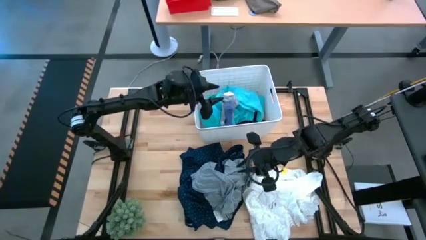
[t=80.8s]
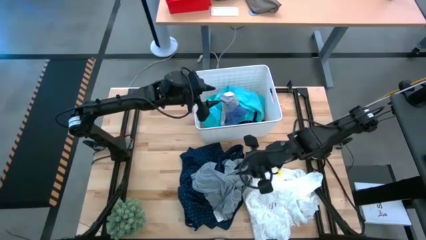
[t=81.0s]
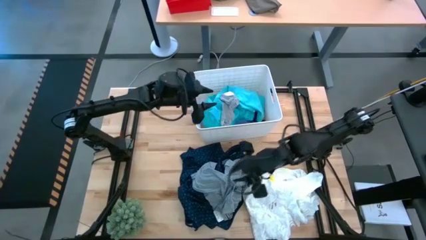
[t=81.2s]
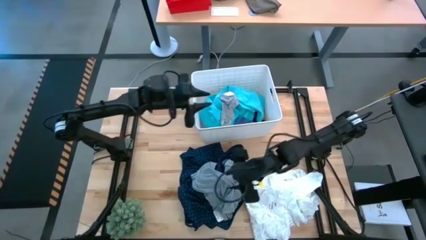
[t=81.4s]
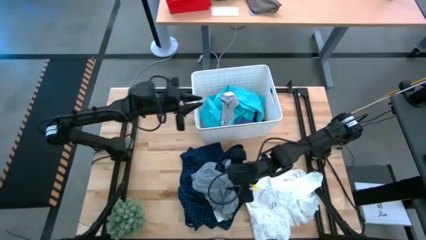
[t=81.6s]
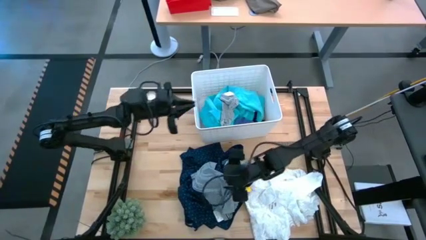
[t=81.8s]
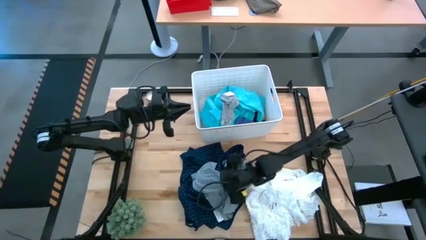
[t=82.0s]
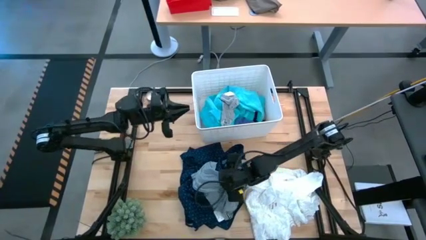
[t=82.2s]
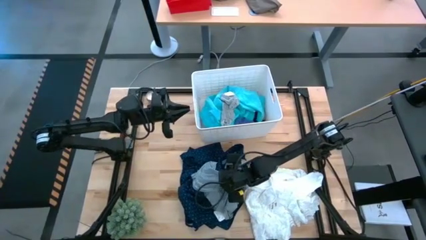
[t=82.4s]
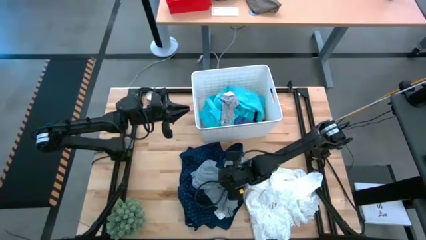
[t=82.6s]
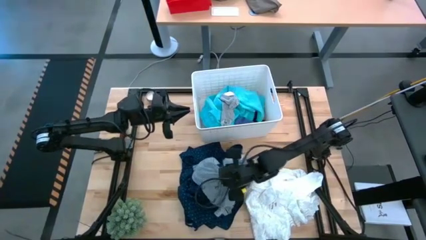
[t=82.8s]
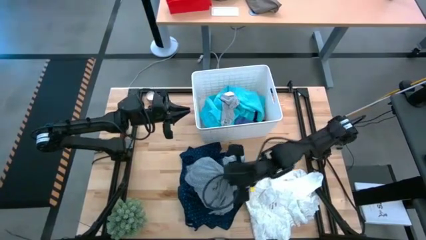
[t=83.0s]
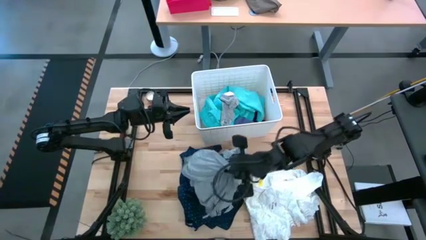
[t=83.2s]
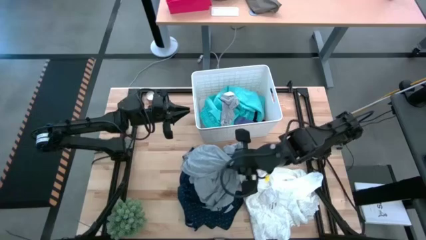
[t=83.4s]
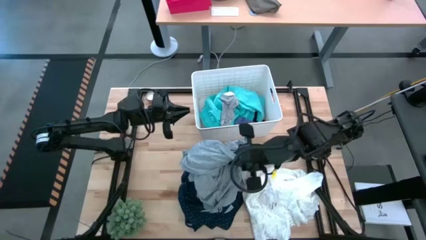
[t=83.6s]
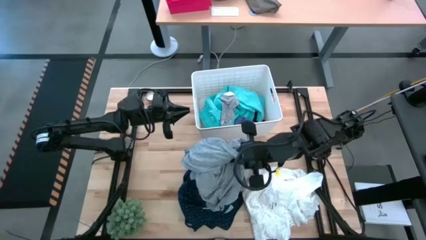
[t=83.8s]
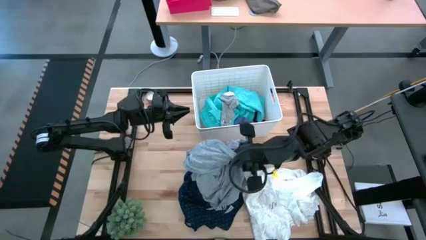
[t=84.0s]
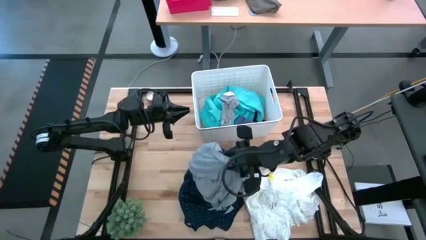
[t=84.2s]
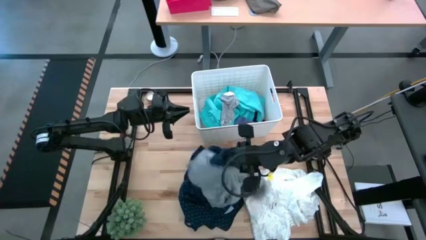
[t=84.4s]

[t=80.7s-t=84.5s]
Task: Sort clothes
Put the gray shirt in the bin

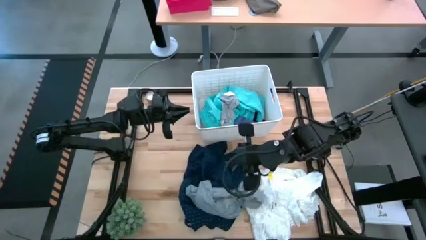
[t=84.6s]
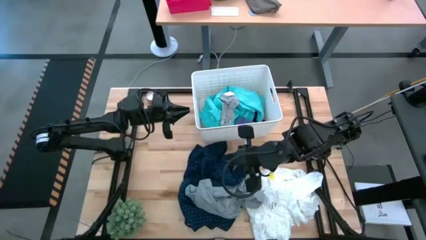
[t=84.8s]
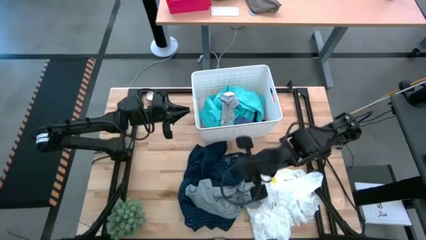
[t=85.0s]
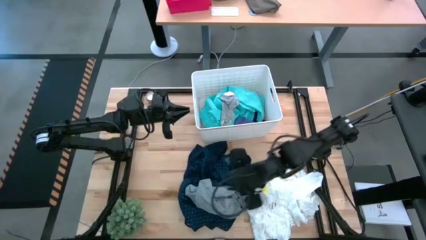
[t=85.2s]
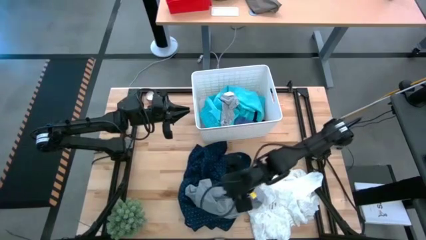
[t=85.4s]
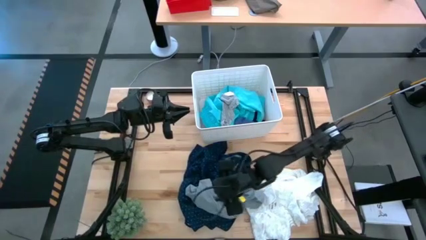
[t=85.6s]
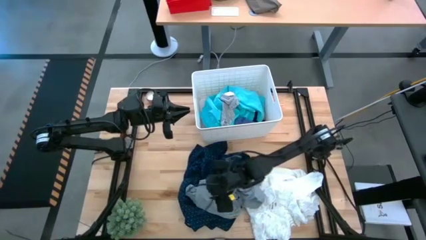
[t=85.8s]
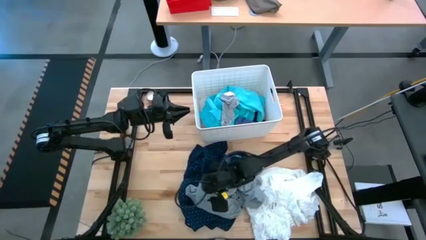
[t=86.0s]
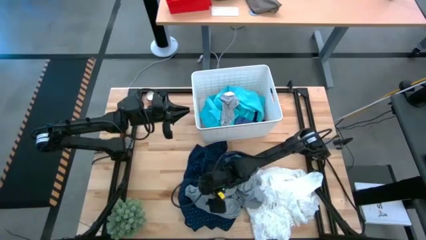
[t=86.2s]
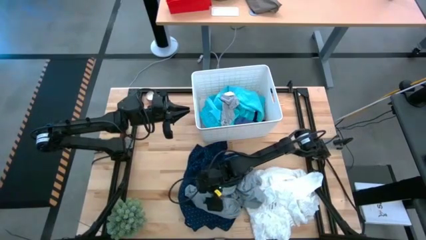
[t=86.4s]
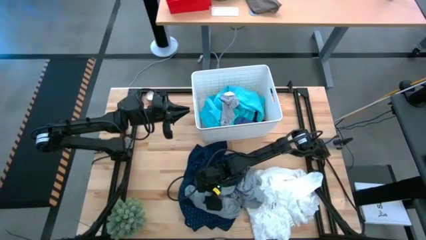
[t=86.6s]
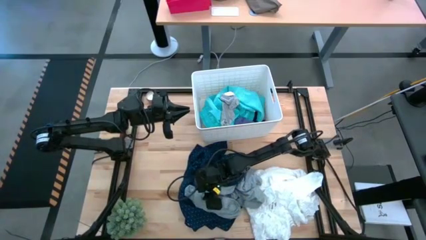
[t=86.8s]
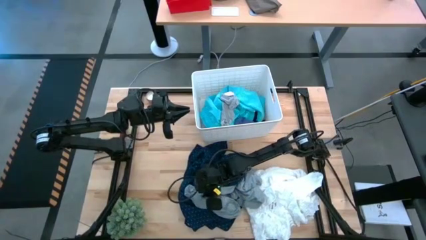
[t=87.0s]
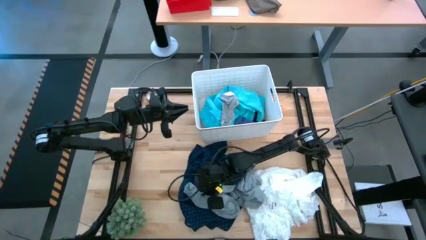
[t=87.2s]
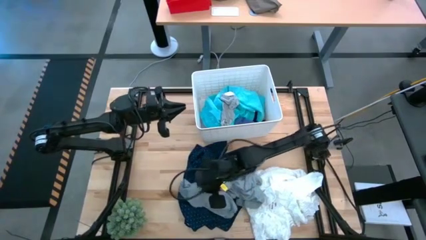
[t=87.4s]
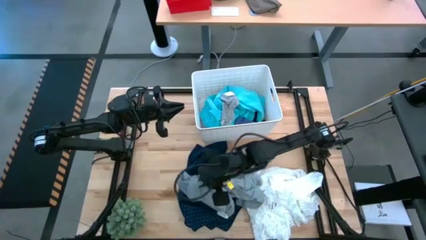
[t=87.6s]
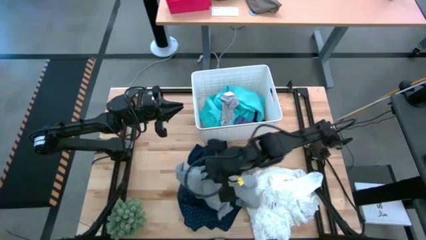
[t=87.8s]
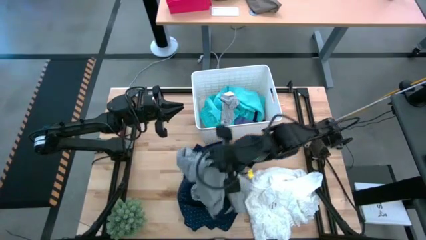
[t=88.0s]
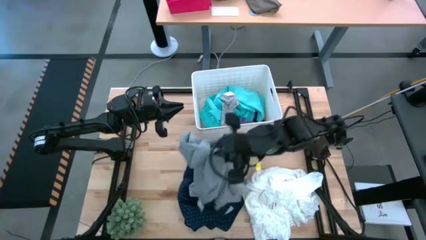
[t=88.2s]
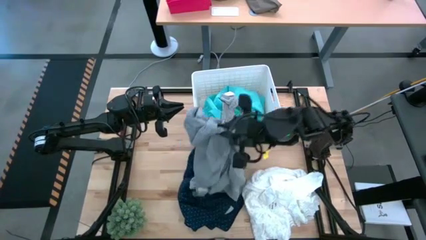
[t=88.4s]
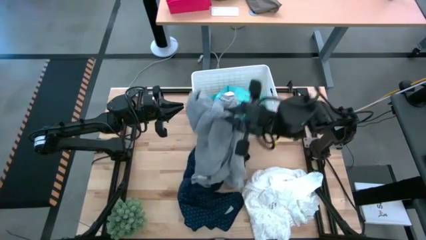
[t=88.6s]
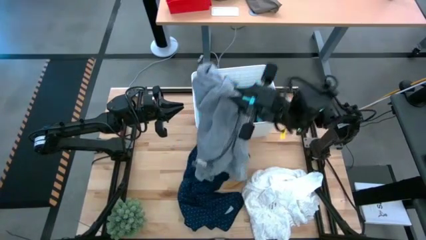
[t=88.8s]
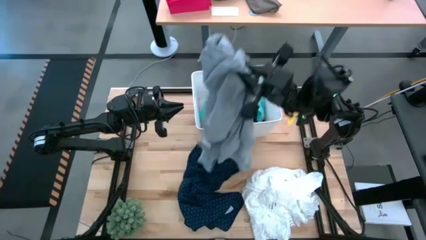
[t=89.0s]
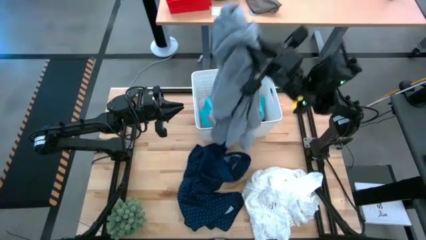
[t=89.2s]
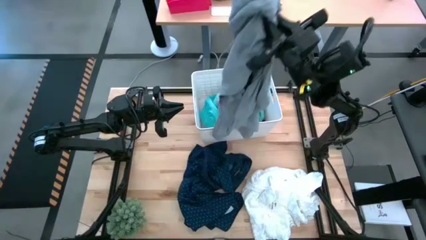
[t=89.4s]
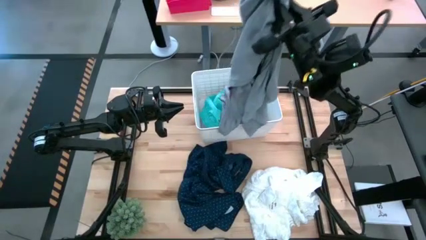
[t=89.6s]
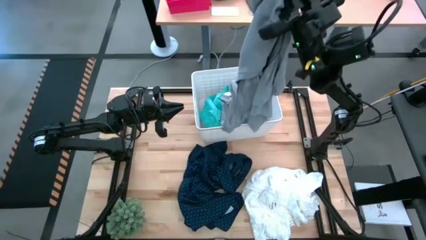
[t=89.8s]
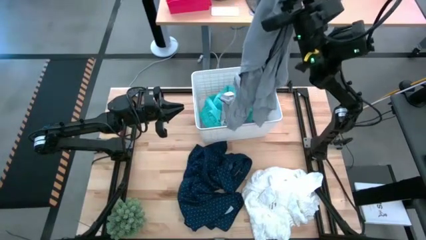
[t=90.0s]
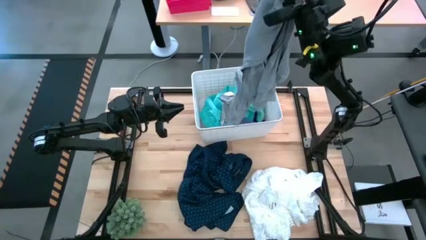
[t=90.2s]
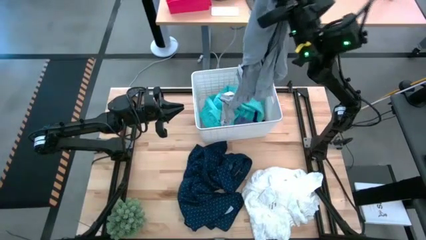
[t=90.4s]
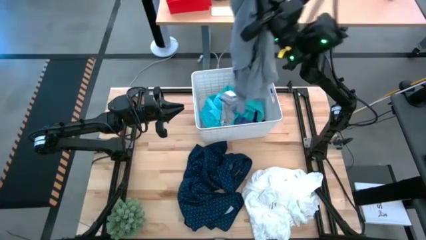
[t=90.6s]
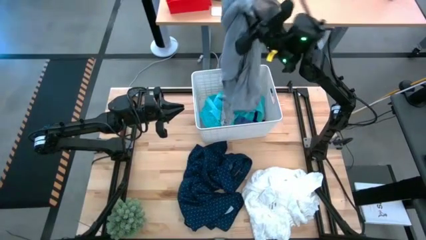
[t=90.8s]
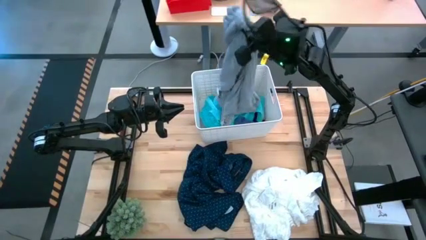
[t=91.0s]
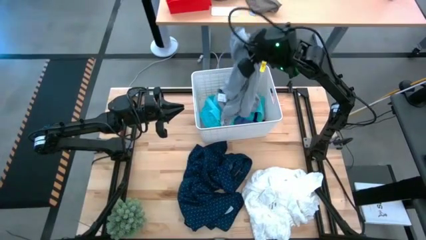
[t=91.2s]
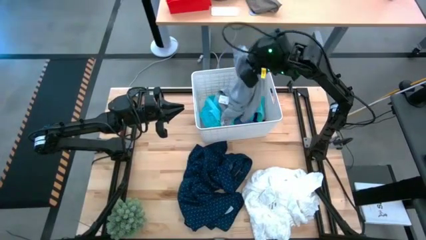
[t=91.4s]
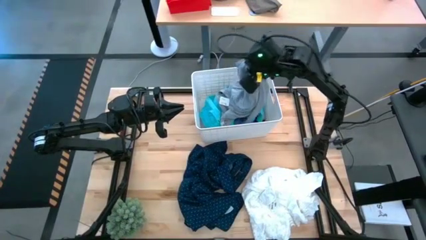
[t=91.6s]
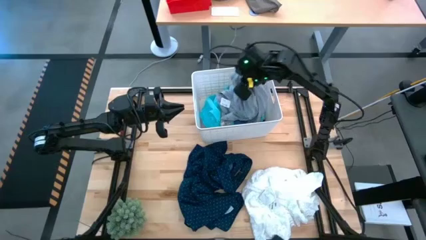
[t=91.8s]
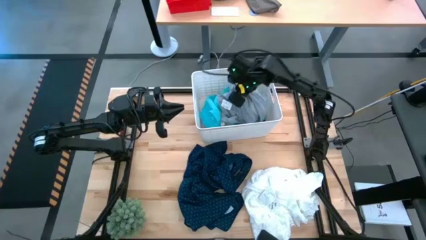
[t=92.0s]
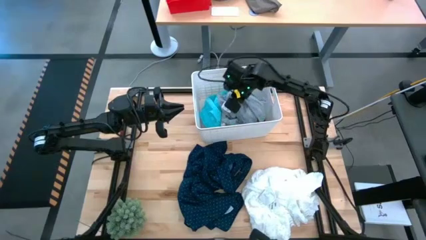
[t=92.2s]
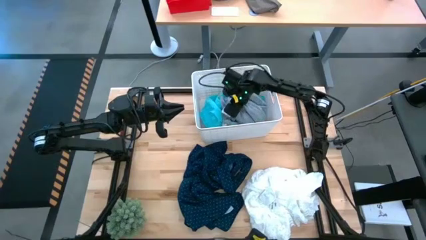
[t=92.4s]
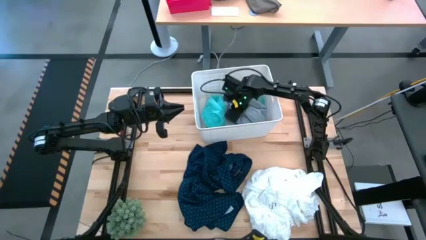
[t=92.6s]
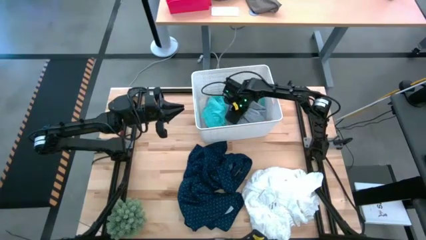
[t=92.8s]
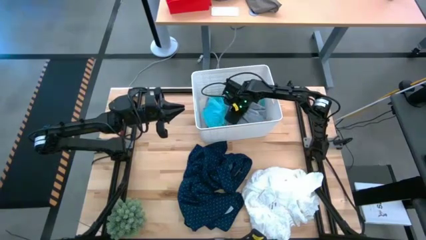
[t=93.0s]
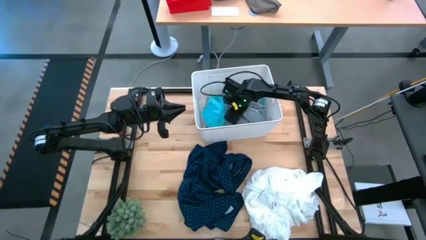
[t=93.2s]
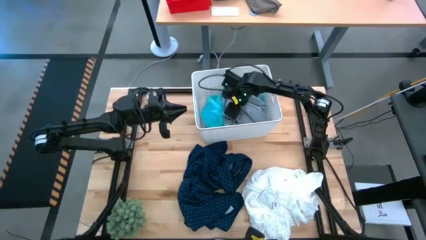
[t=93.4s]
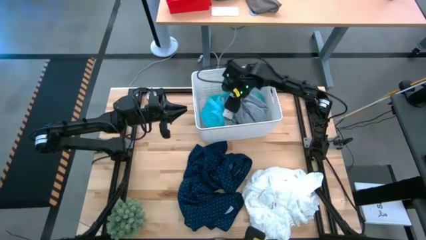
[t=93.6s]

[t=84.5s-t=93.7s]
Put the gray shirt in the bin

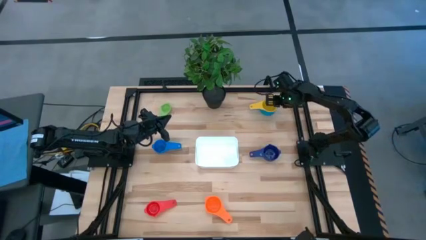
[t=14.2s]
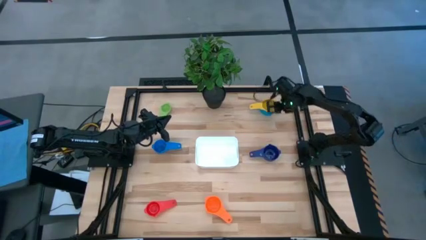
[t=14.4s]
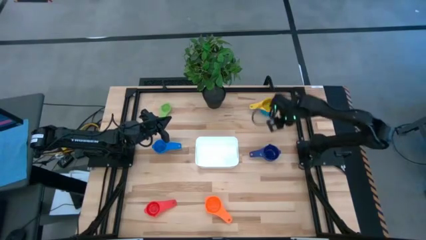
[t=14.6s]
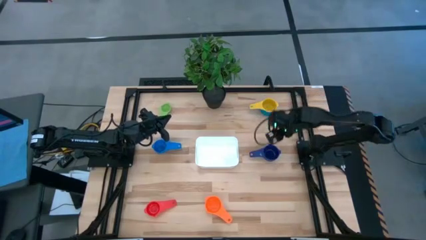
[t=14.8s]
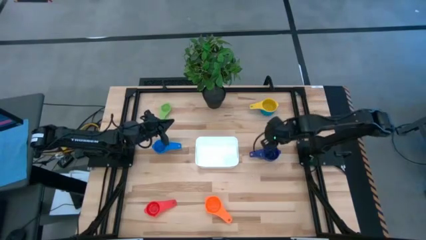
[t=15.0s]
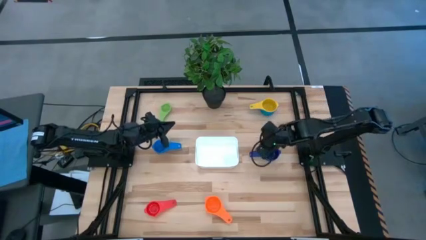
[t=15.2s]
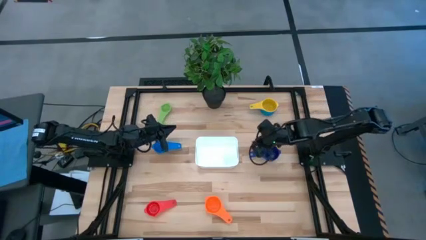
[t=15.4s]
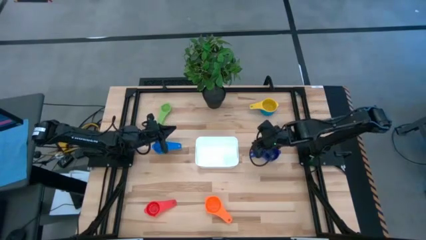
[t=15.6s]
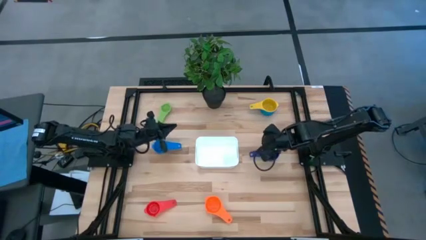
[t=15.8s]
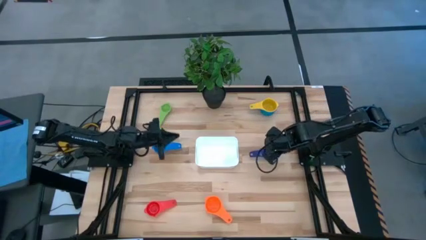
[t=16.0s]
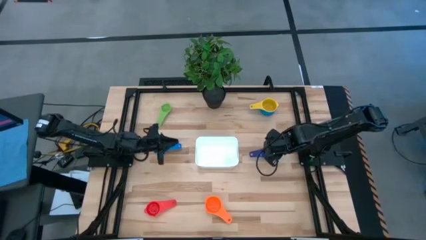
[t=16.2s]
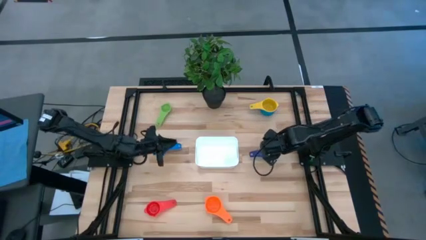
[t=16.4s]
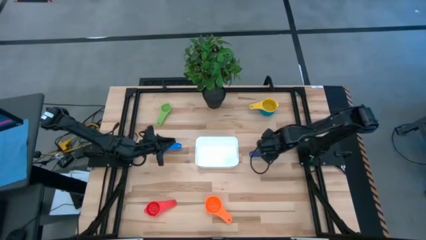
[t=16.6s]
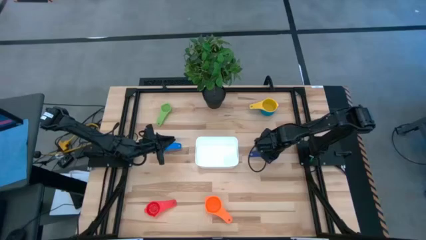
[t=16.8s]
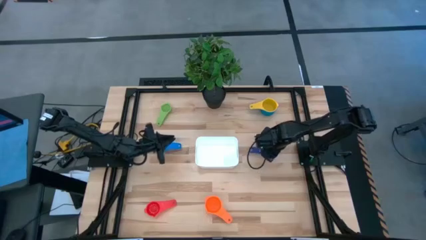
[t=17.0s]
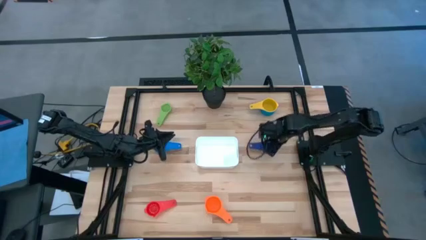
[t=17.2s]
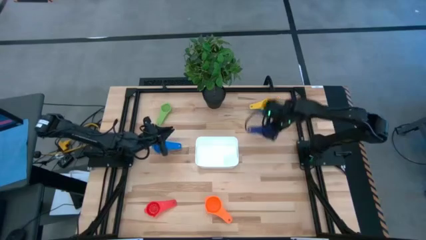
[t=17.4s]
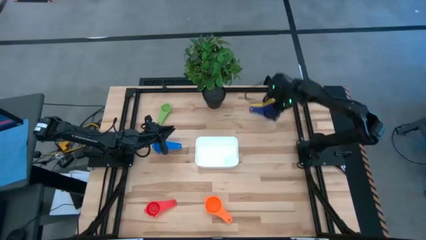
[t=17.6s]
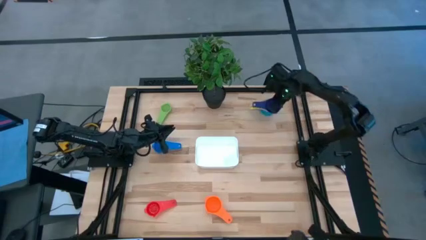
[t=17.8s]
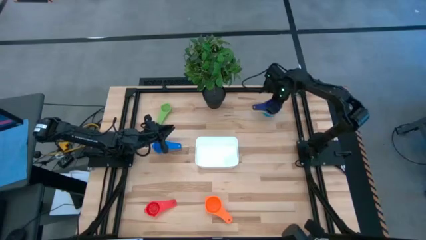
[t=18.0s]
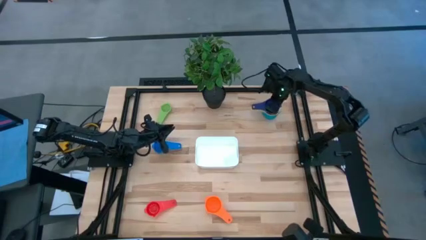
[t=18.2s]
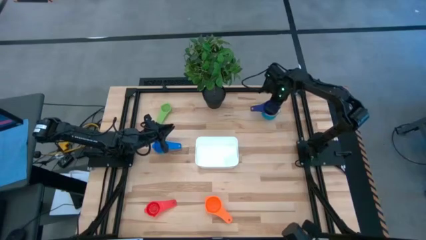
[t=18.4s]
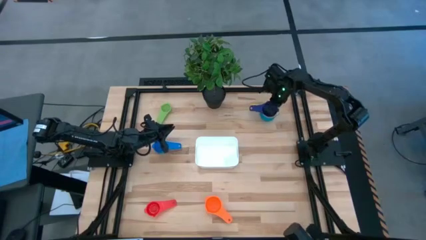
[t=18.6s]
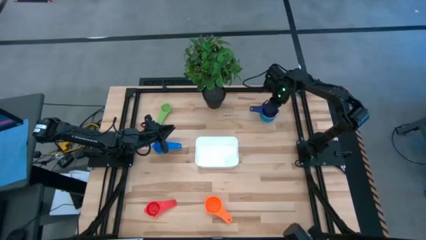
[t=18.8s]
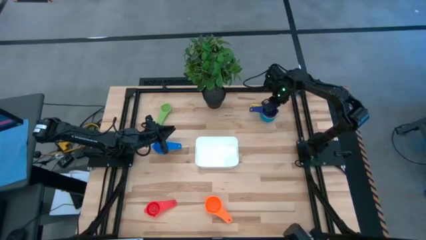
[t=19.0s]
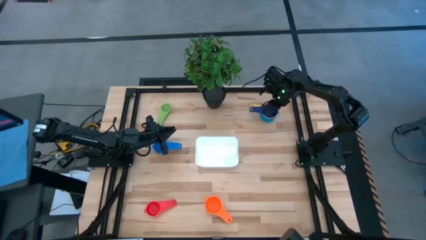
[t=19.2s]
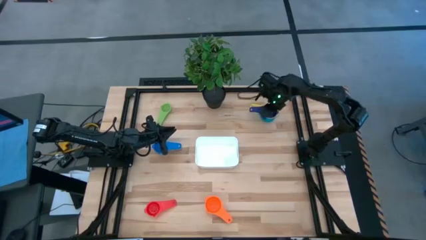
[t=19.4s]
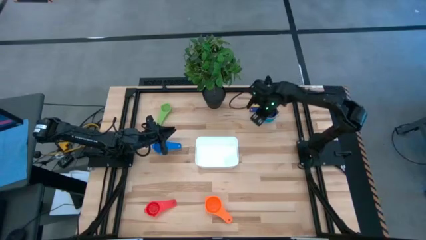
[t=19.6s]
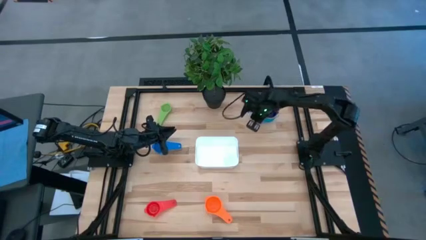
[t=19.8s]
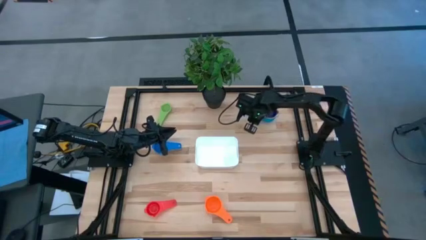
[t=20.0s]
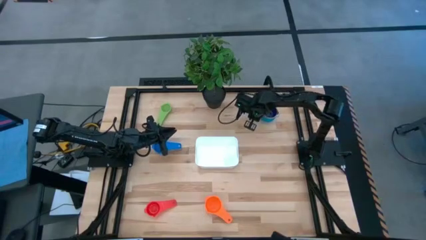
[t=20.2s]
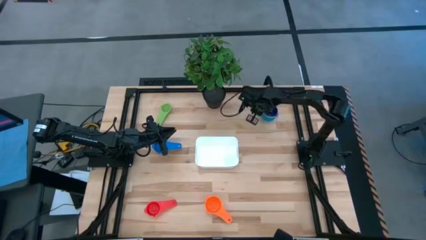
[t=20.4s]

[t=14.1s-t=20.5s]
Task: Nest measuring cups in basket
Stack the dark blue measuring cup on top of the yellow measuring cup
